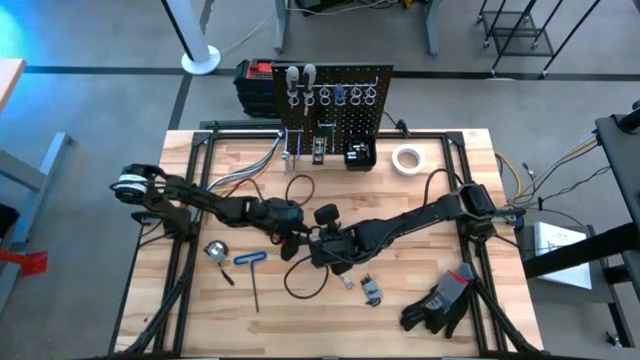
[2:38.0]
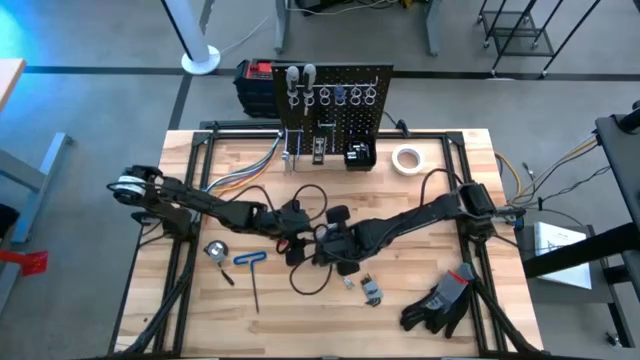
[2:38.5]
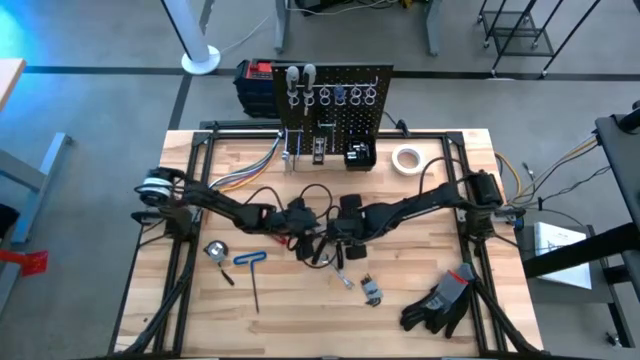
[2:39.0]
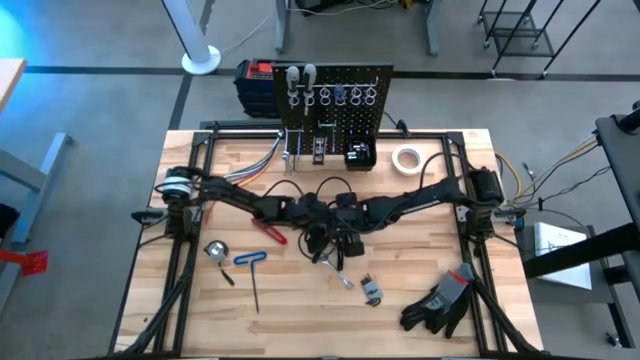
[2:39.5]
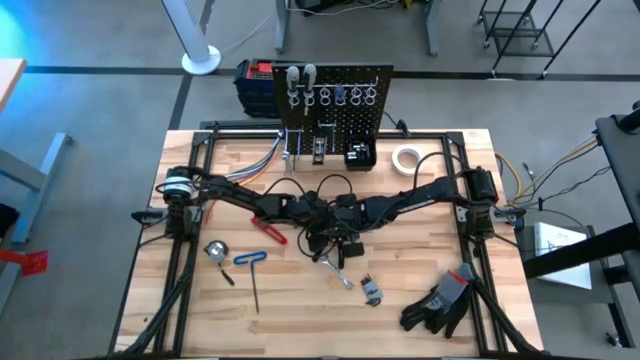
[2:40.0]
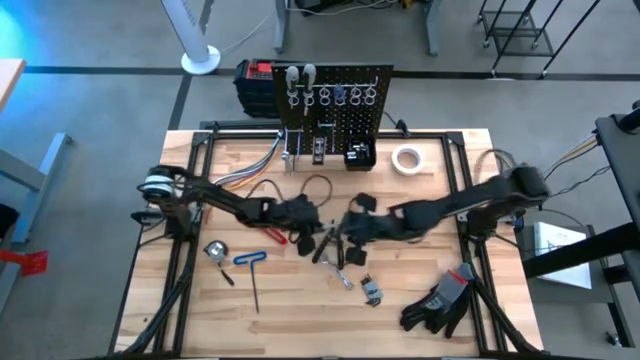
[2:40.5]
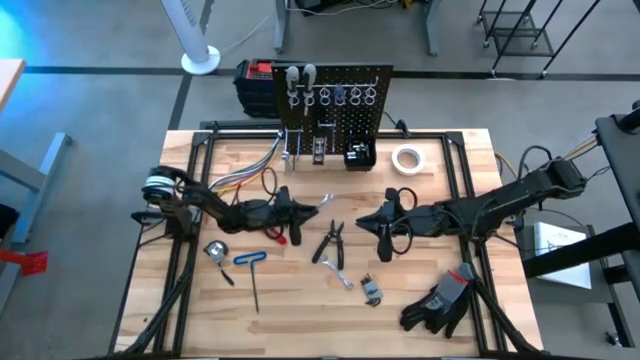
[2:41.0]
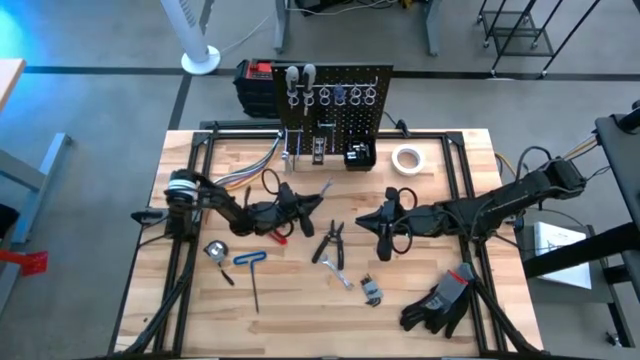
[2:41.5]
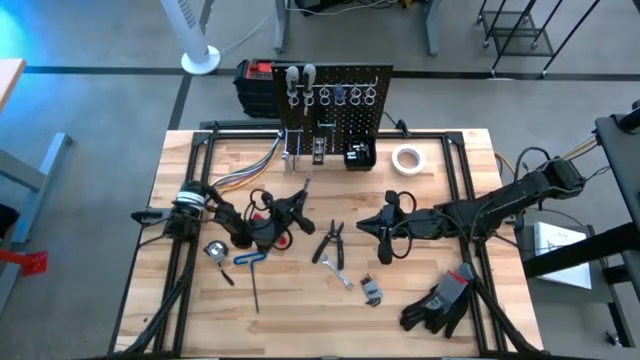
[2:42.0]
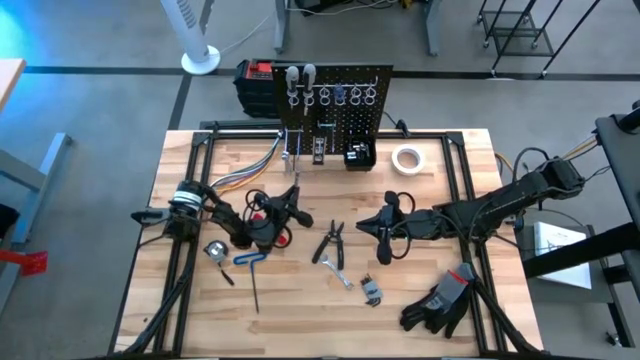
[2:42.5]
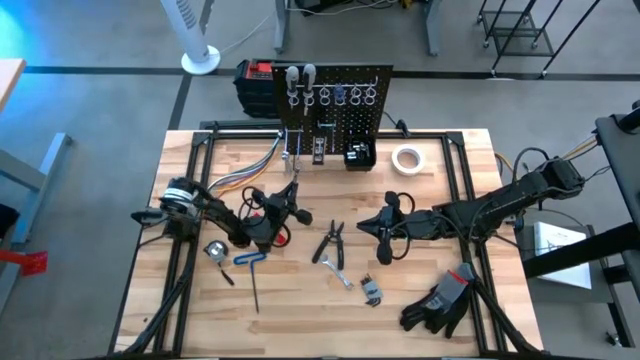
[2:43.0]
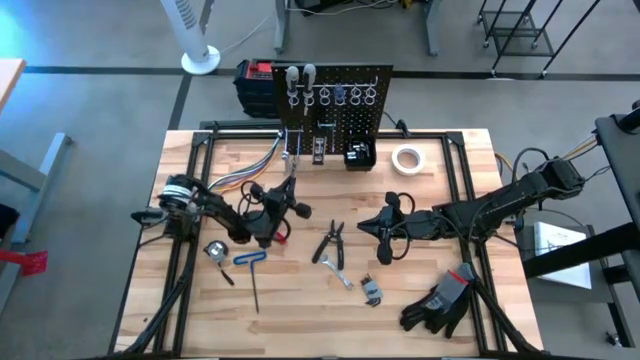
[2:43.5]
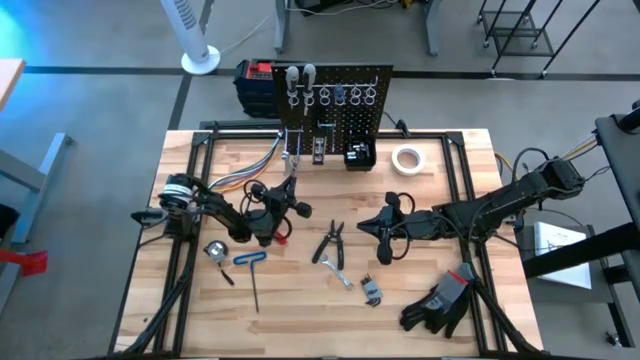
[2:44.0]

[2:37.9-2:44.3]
Task: Hang tools onto peg board
Hang the wrench on the peg board

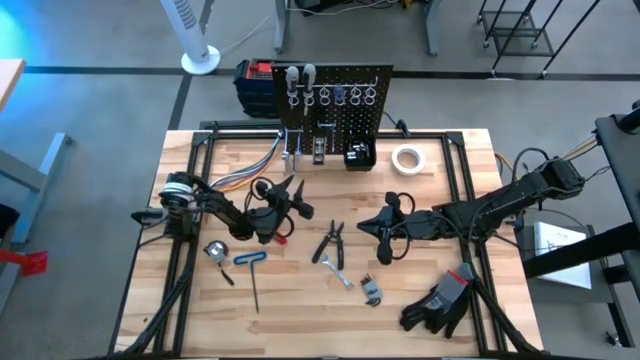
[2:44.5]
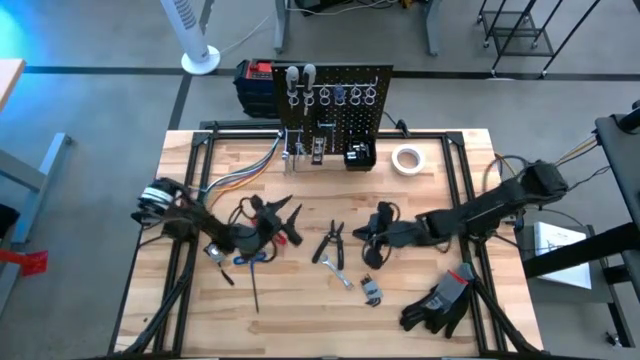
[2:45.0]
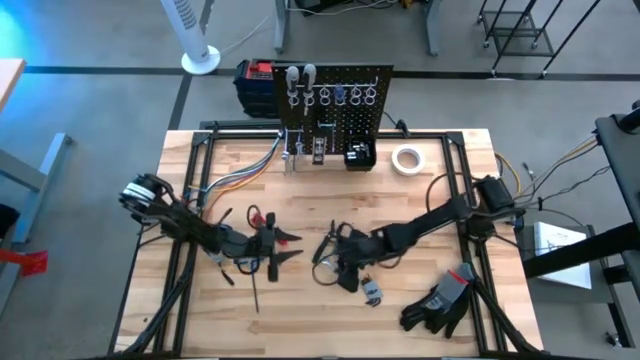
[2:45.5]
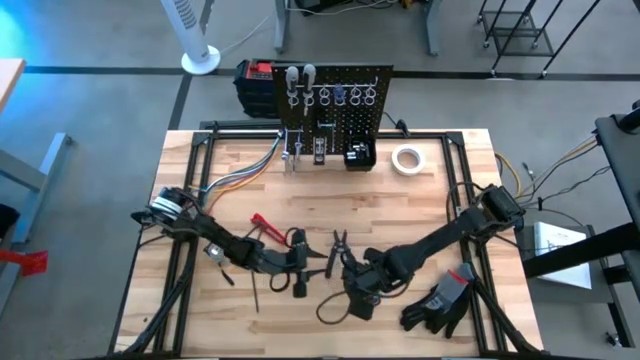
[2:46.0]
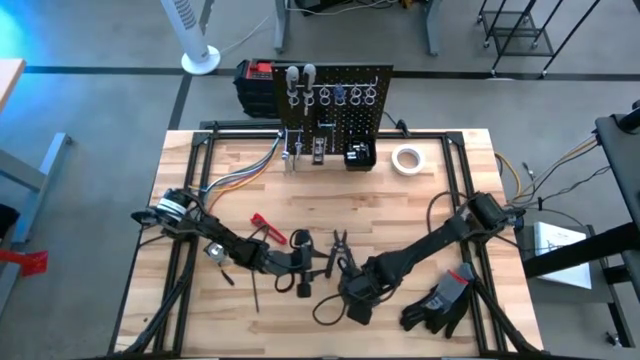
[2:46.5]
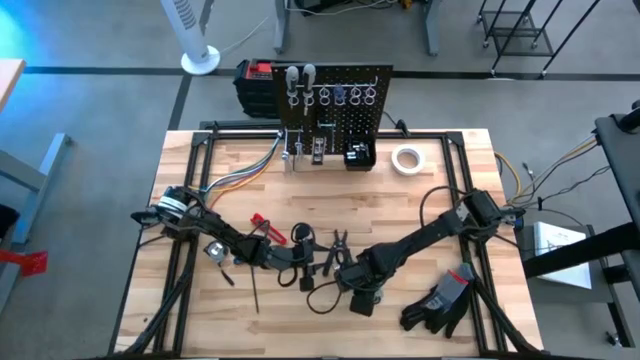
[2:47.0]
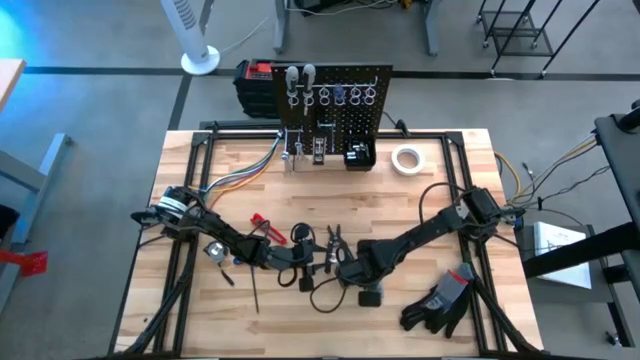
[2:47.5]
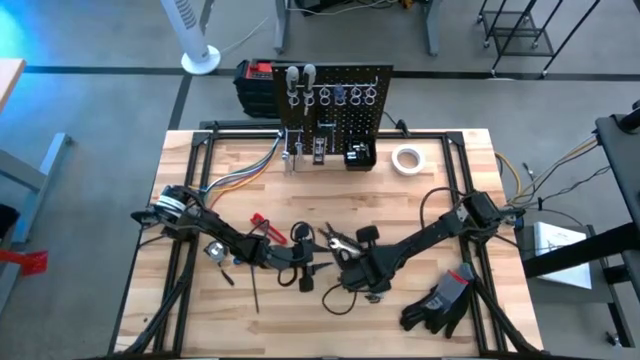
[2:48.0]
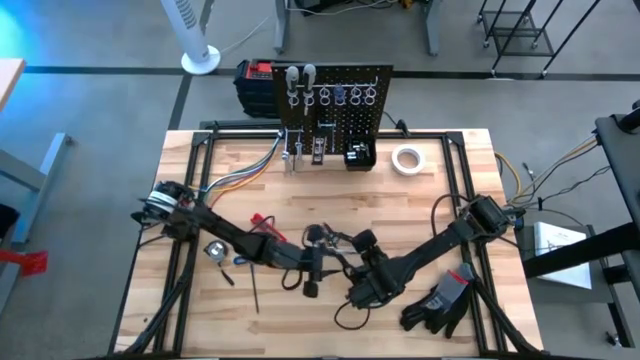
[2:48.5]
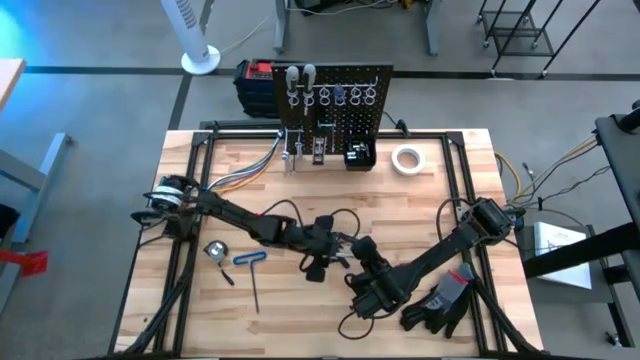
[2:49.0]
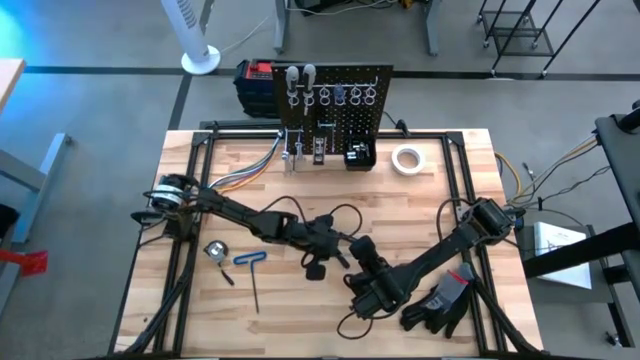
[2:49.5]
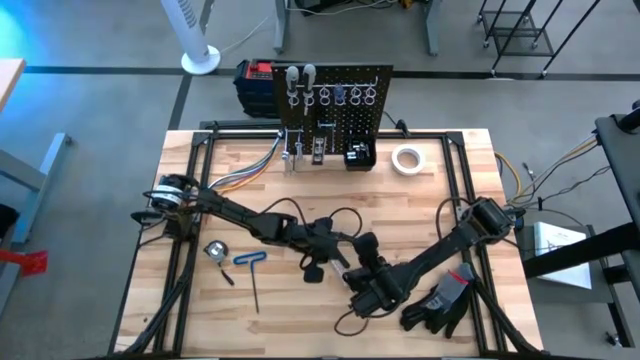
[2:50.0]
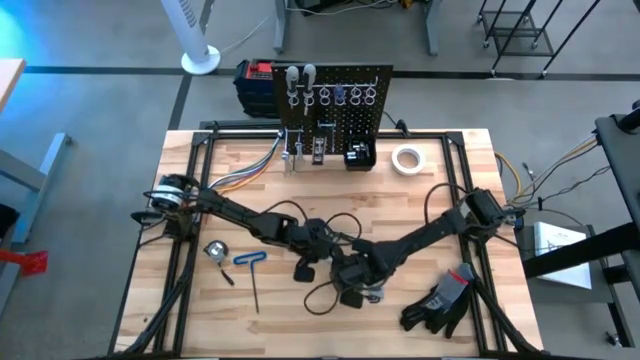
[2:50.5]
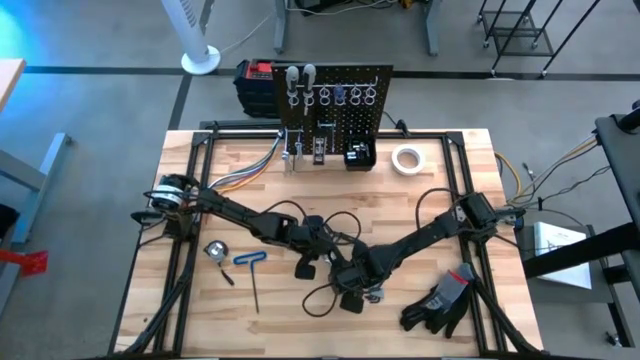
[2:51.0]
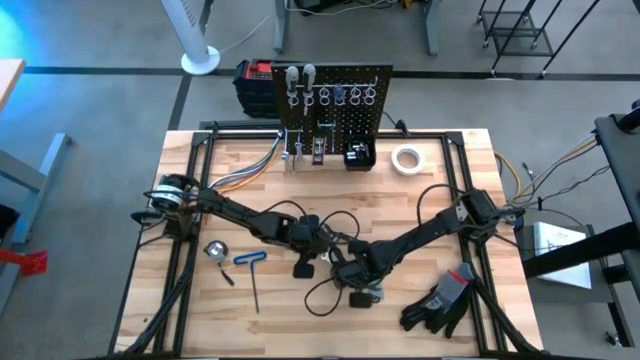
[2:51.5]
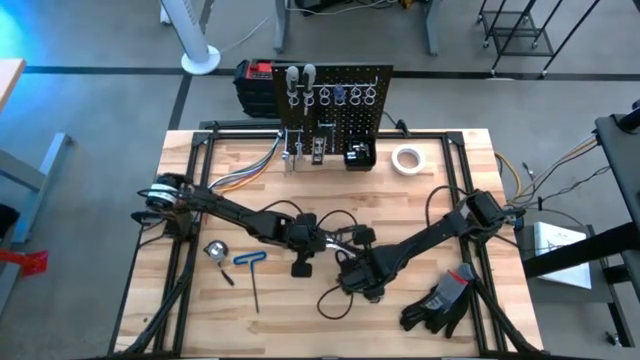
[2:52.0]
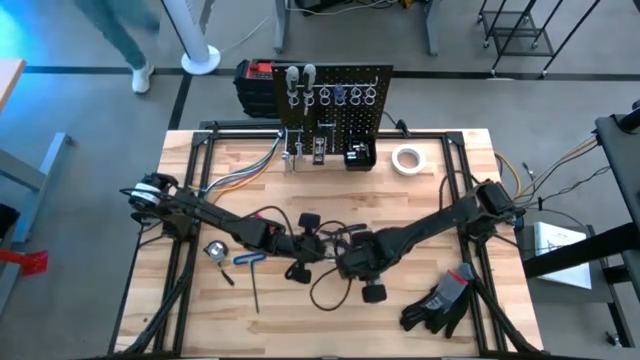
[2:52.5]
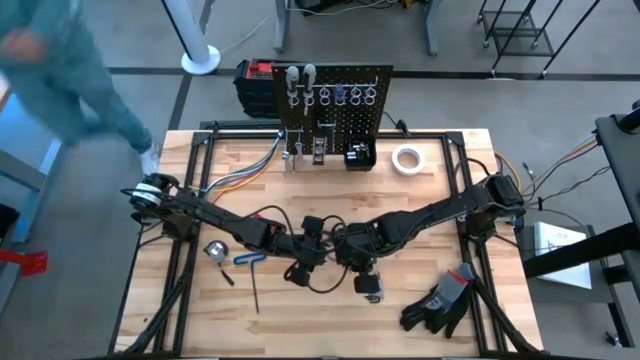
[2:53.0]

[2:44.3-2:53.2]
Hang the wrench on the peg board

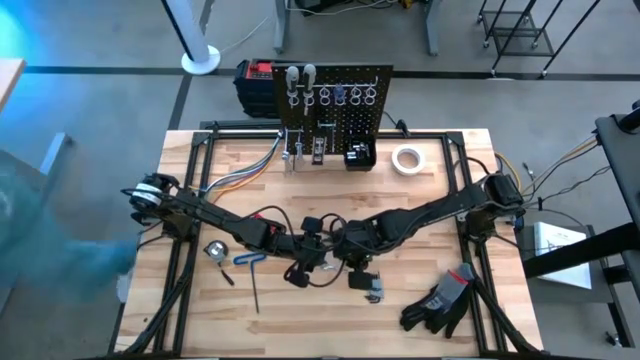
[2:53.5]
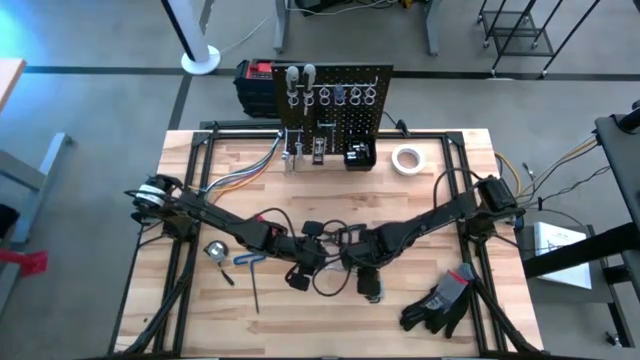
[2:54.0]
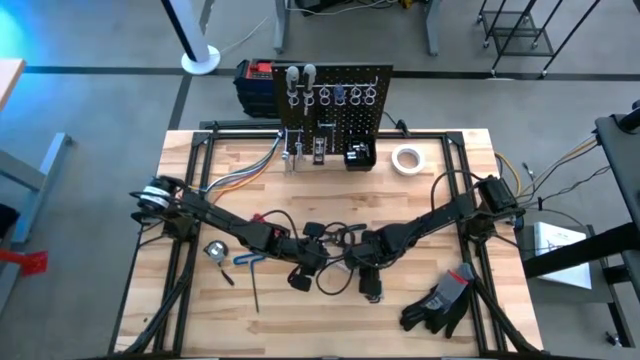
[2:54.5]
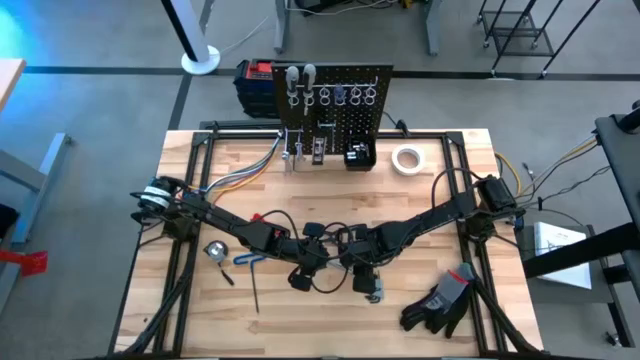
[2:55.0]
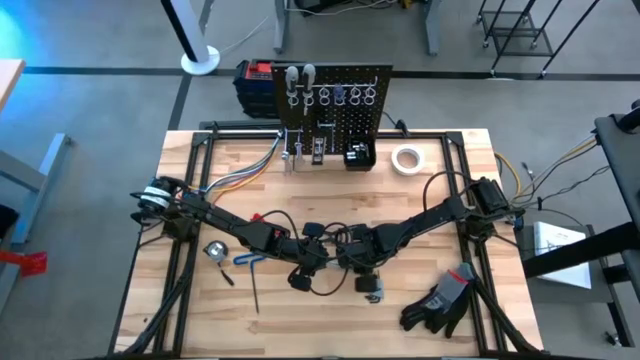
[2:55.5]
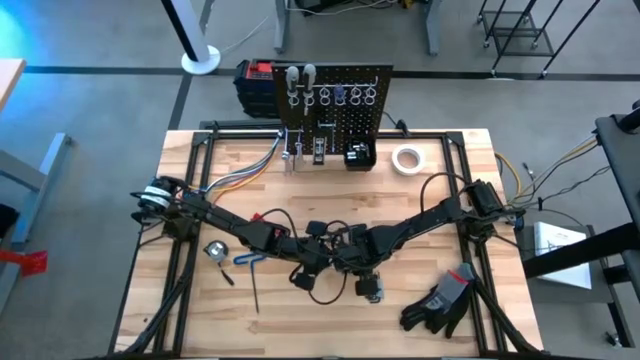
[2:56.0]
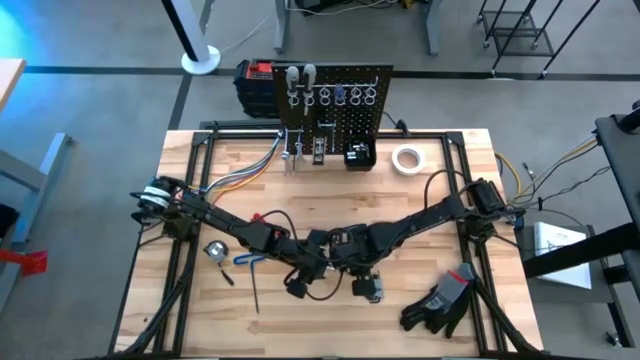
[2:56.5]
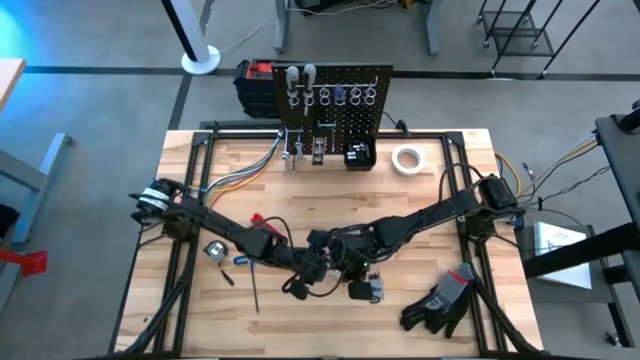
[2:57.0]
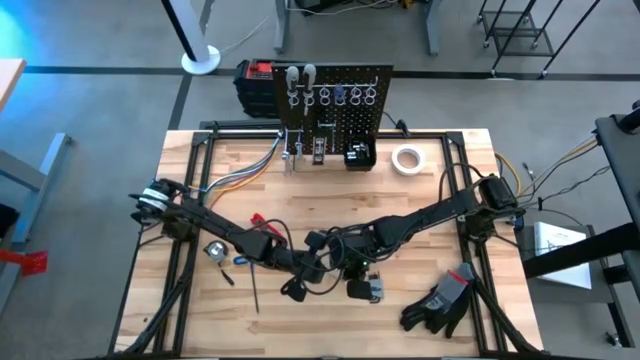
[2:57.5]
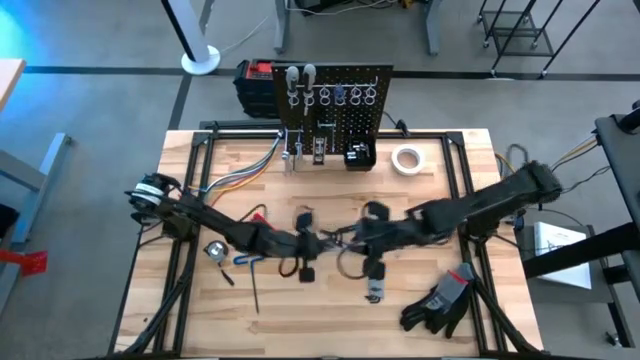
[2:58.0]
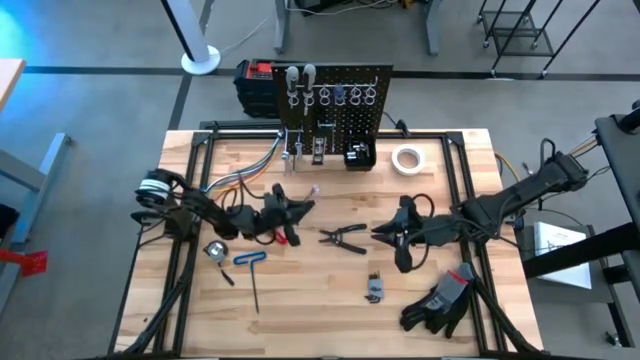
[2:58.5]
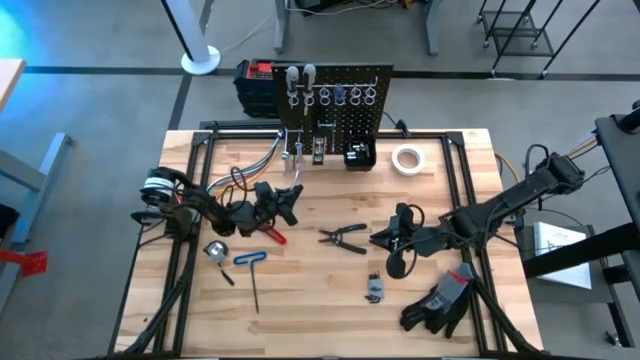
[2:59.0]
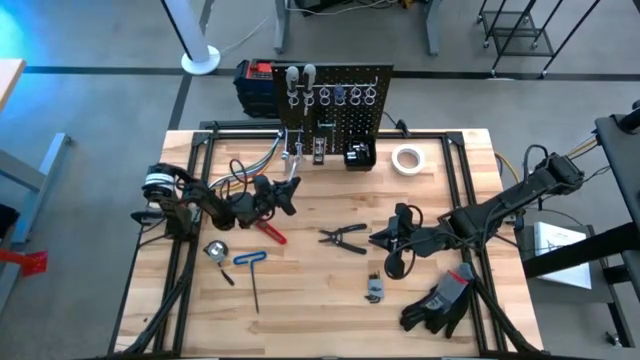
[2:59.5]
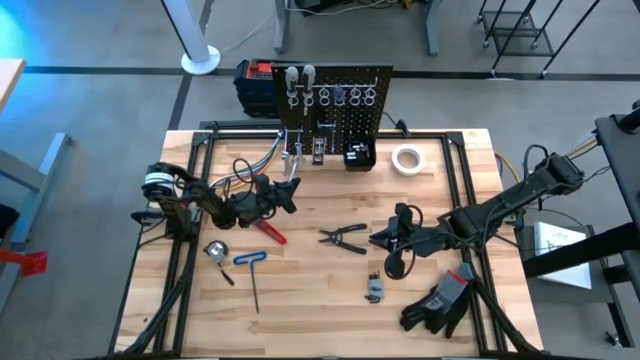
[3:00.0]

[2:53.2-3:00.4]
Hang the wrench on the peg board
